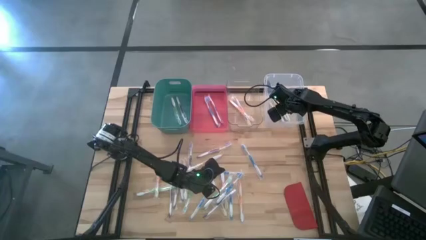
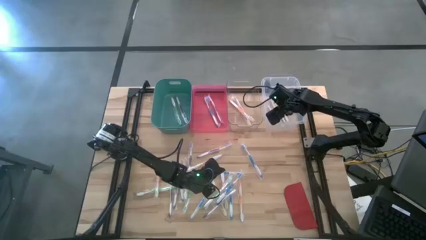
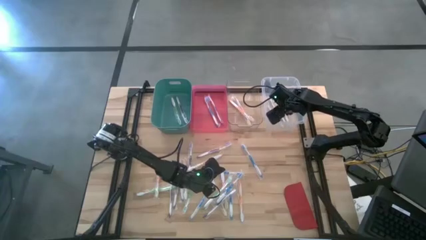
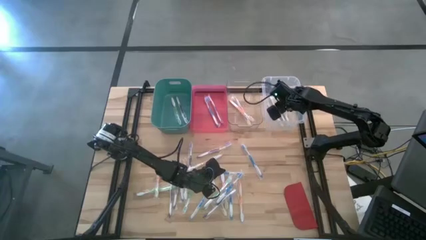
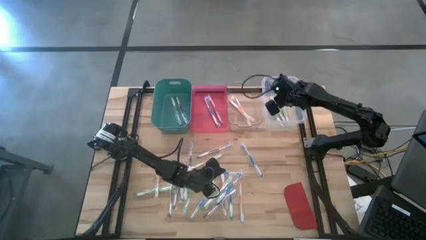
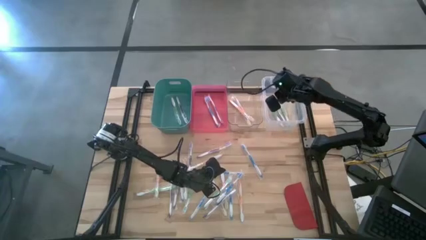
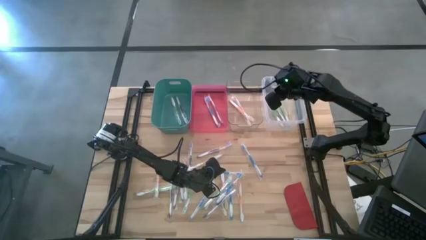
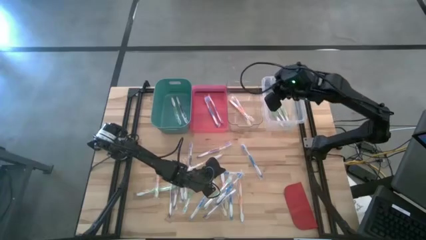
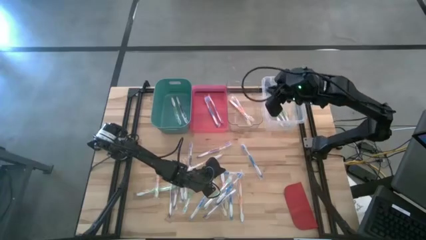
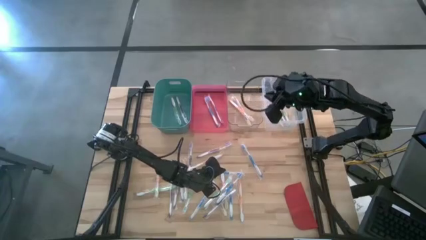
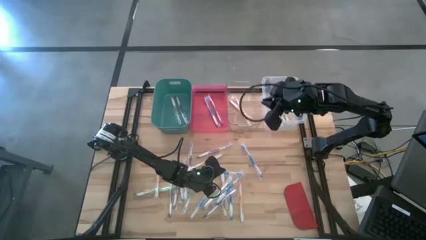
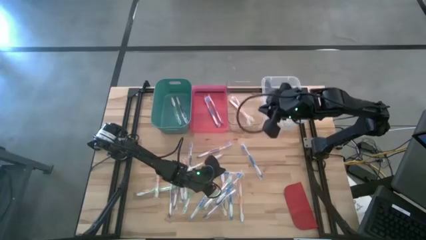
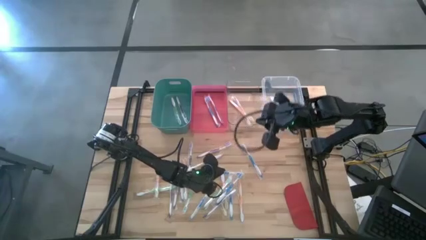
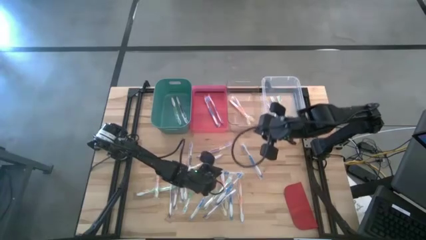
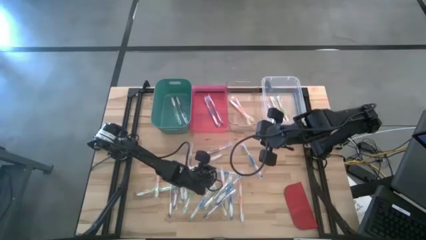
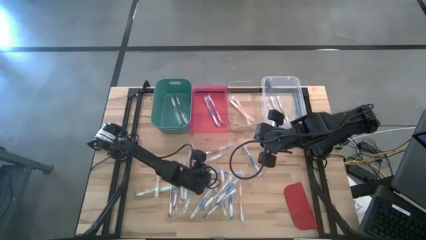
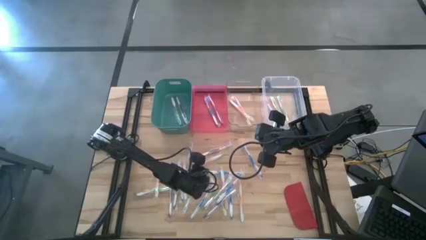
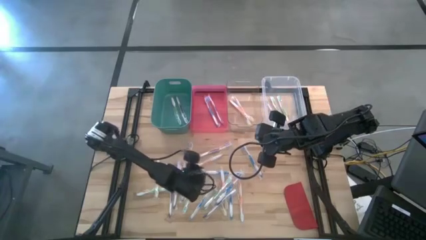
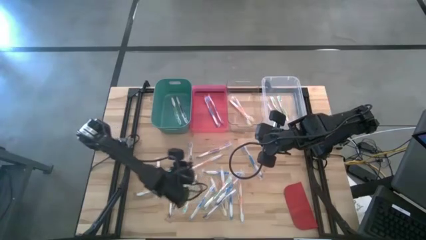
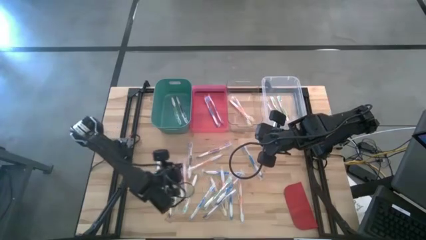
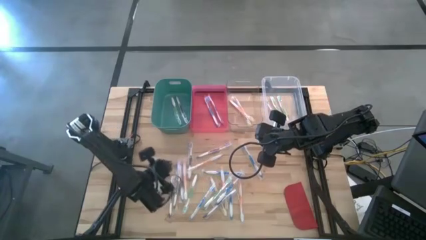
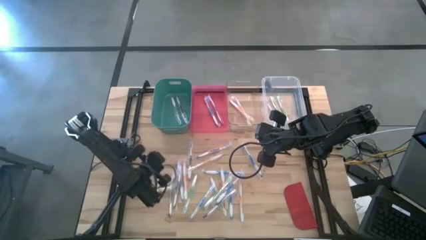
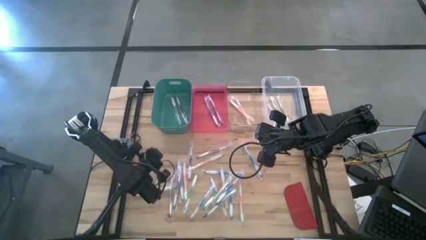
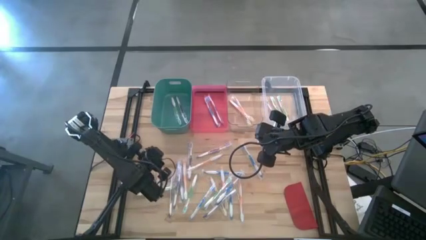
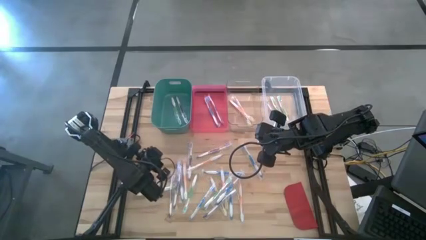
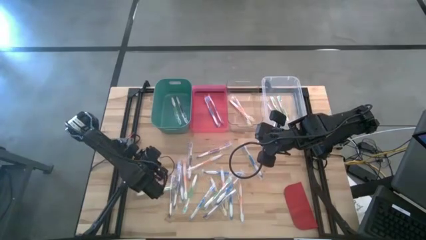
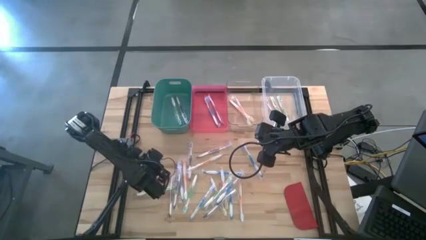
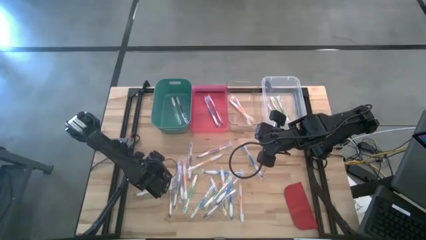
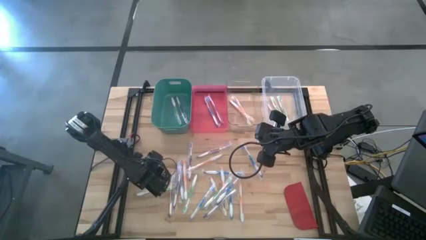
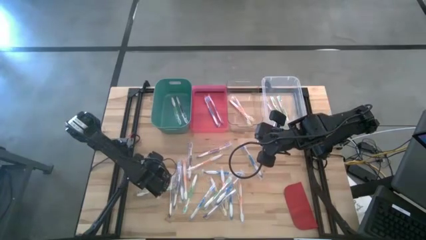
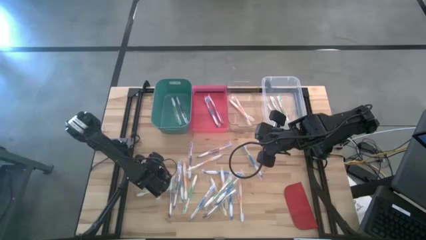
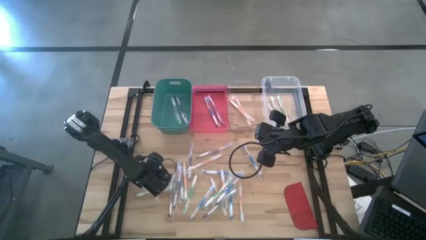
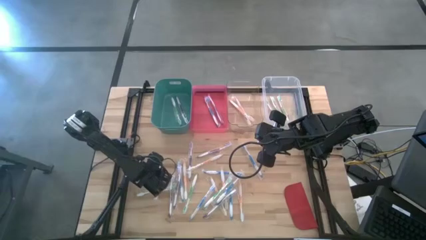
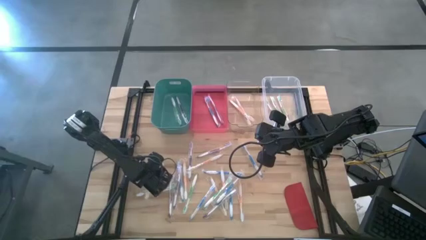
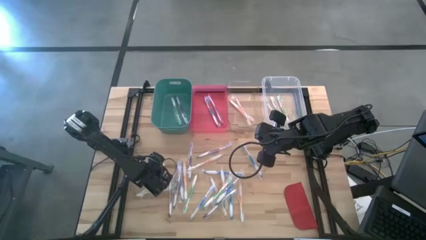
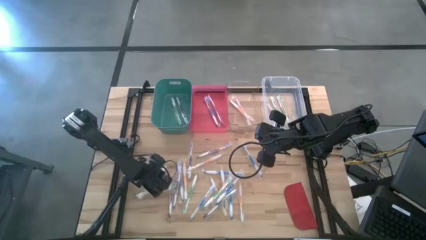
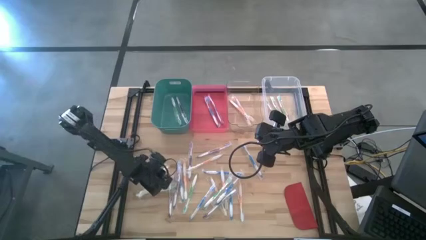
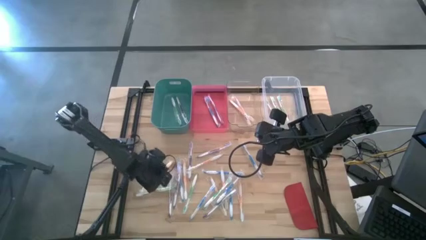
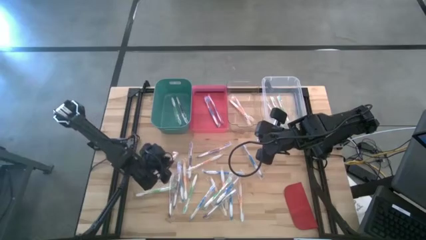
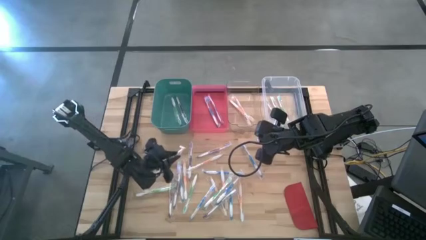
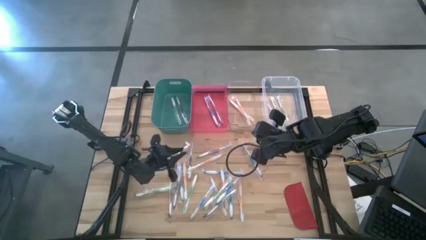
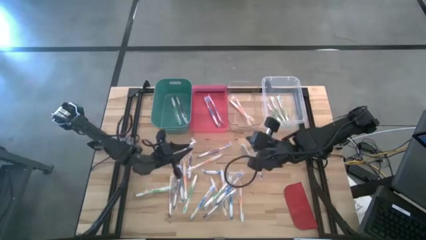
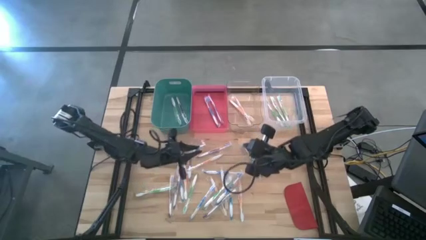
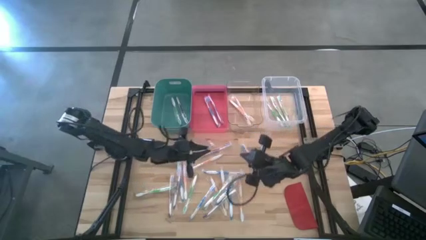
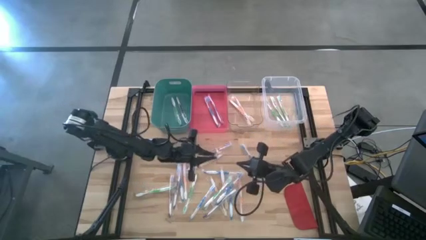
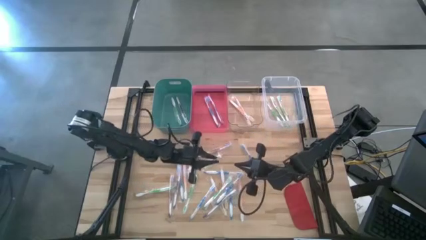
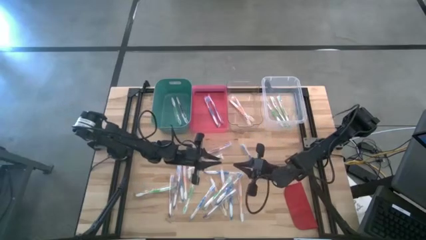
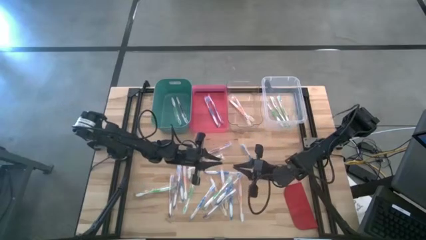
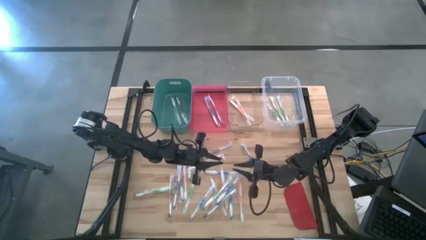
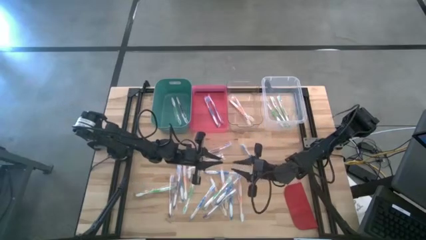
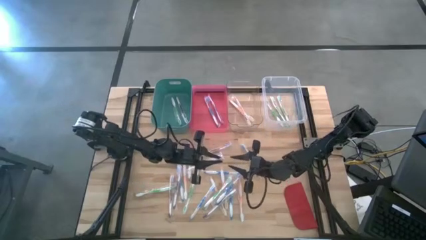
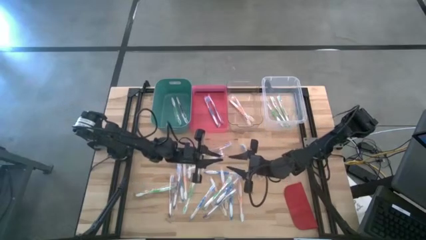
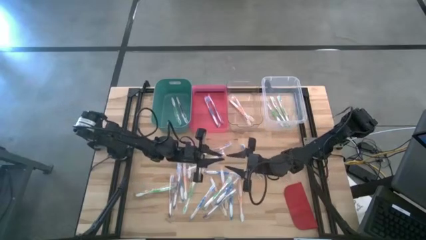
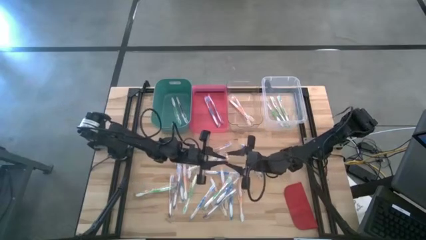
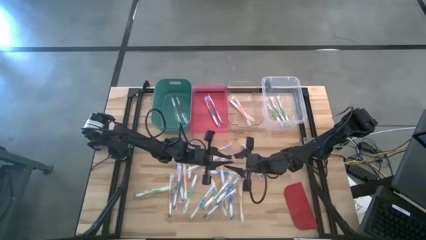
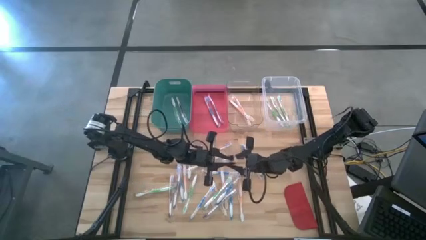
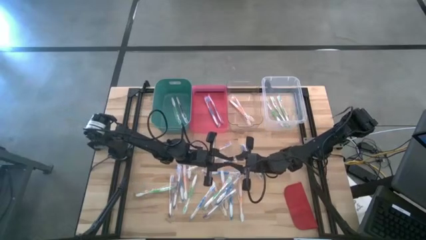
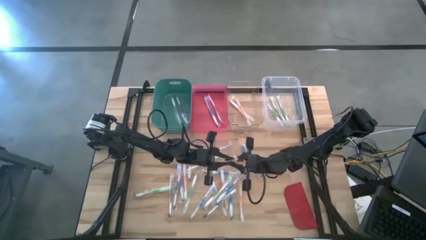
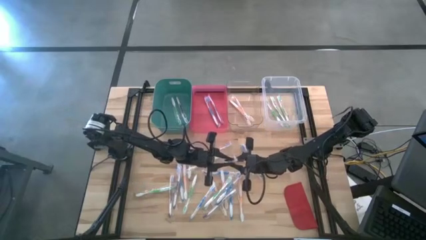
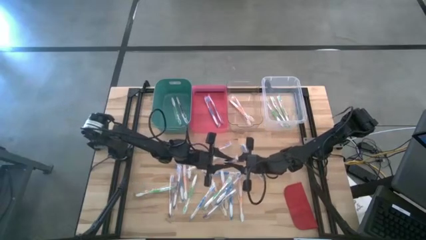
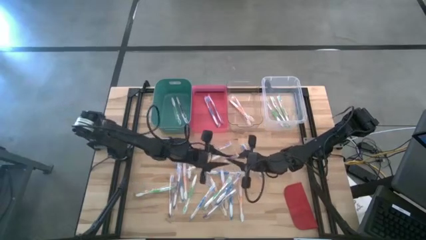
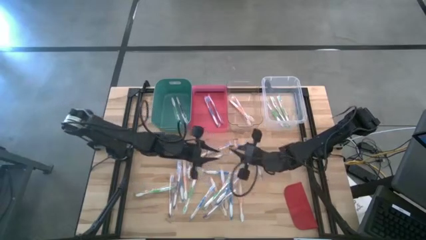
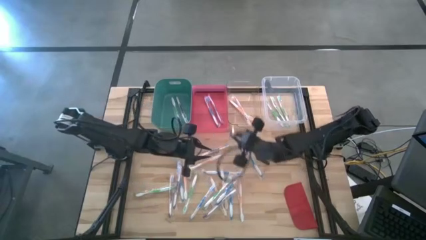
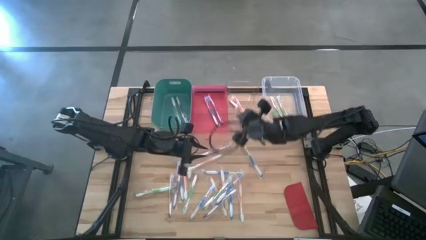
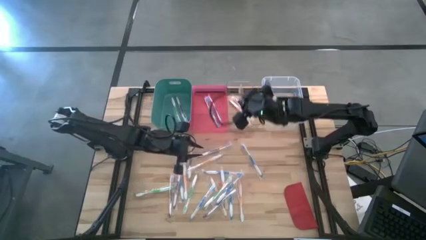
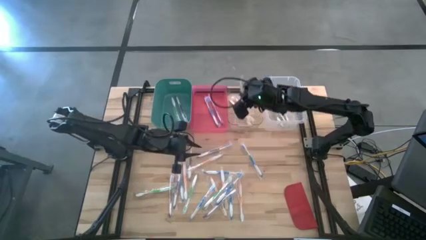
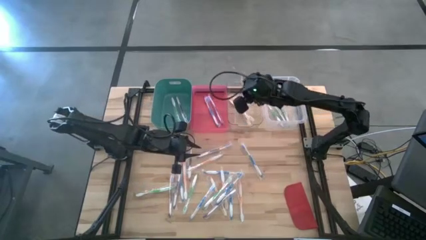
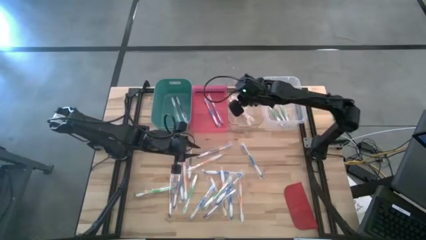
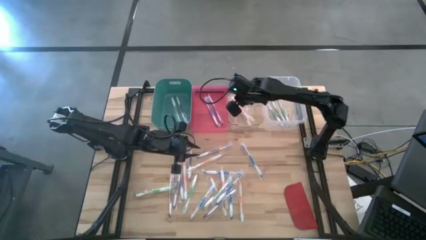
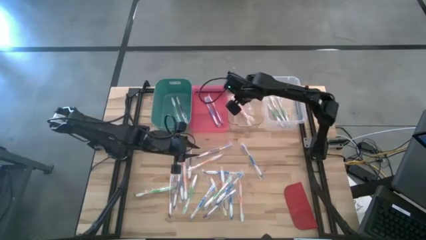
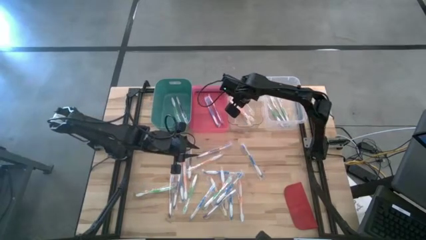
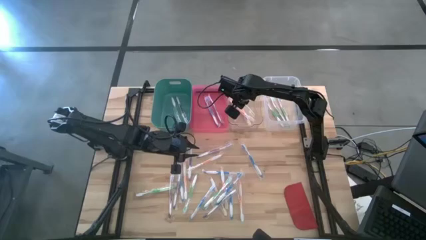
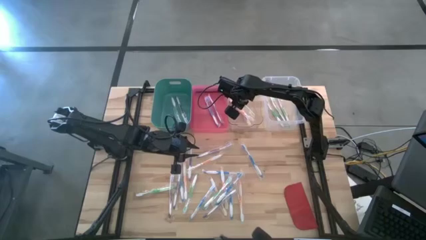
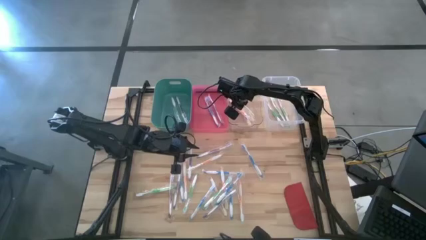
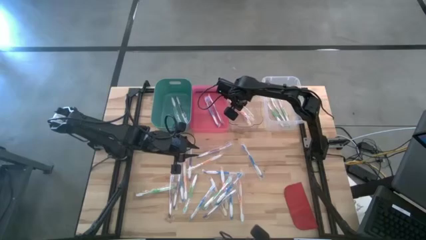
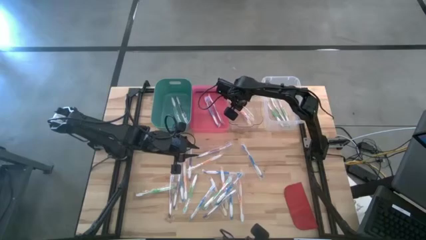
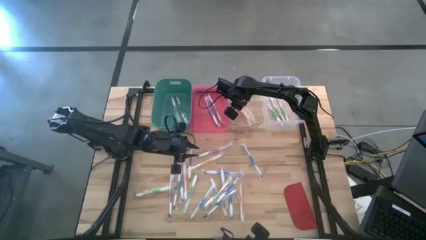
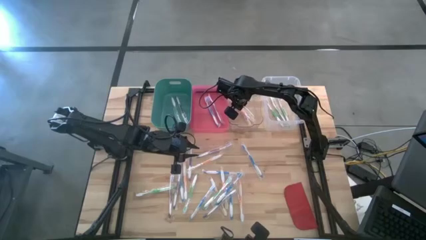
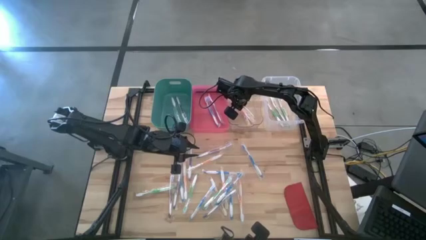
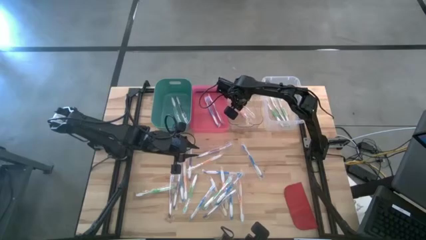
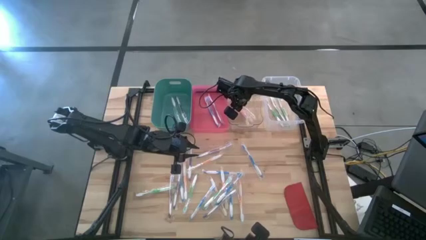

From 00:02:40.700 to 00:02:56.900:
Task: Pick & Place Toothbrushes
Put the orange toothbrush into the transparent bin

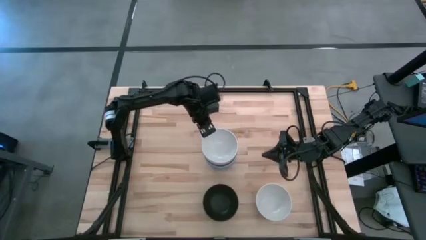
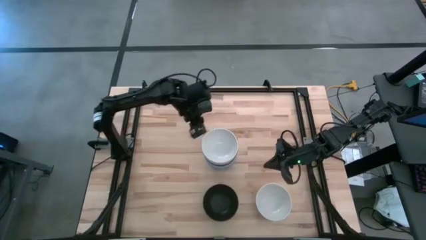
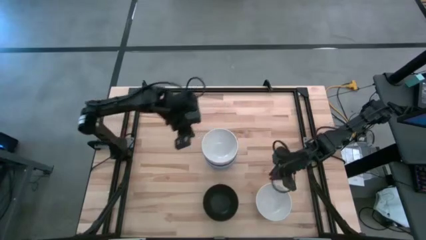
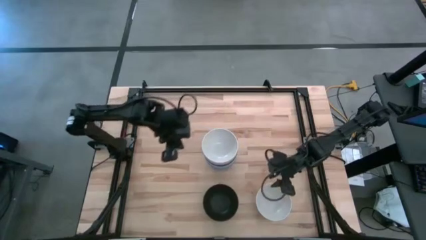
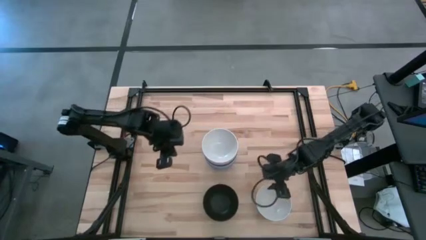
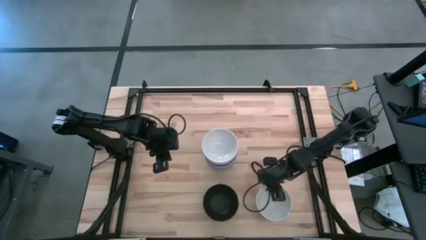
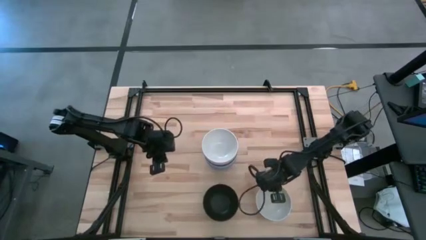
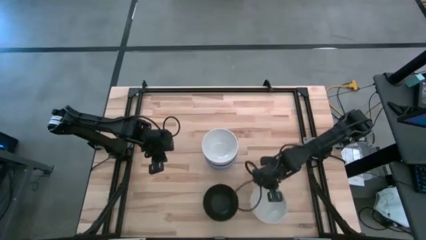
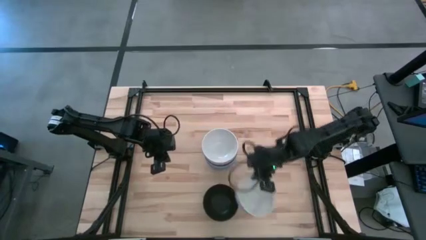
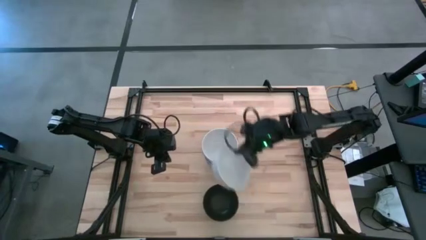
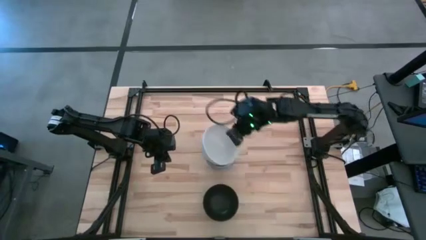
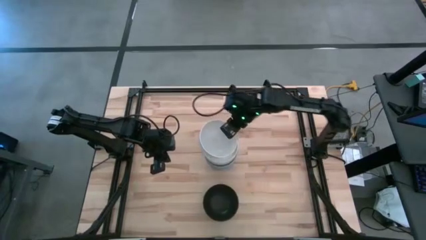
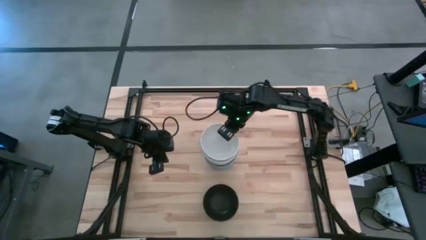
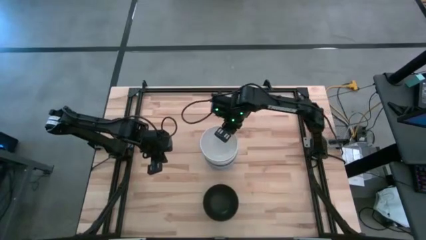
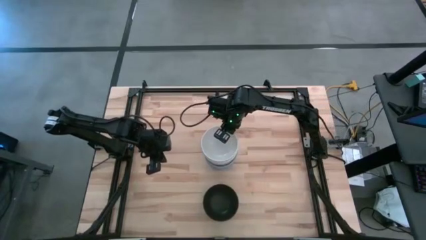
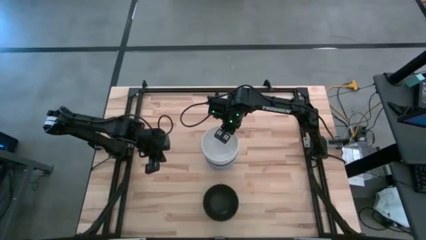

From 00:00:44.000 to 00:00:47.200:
Task: Nest bowls inside each other
Stack the bottom white bowl on top of the other top white bowl
